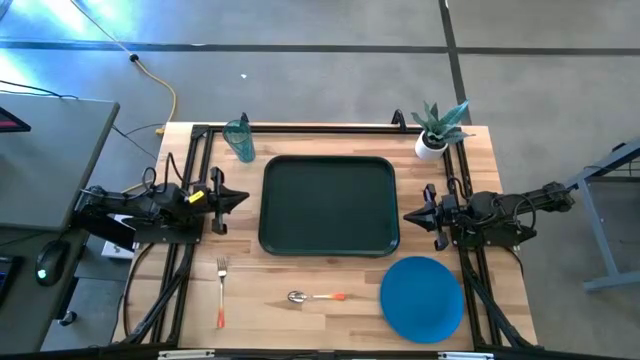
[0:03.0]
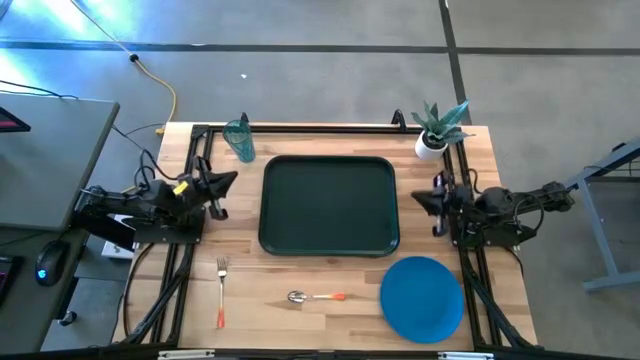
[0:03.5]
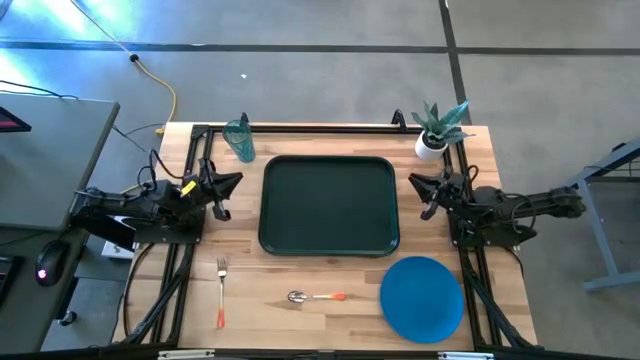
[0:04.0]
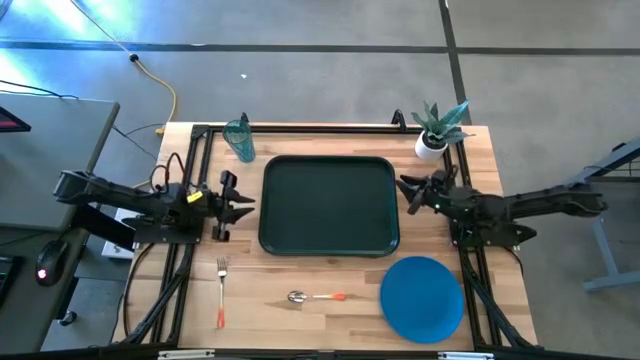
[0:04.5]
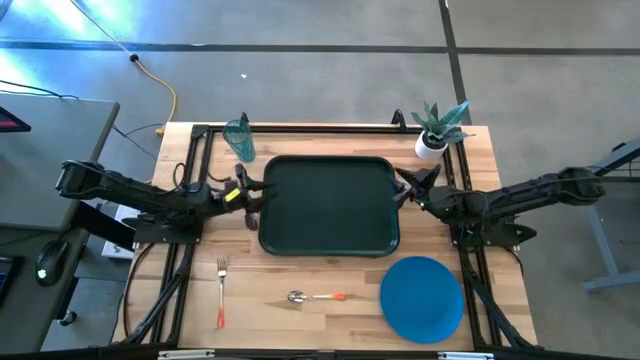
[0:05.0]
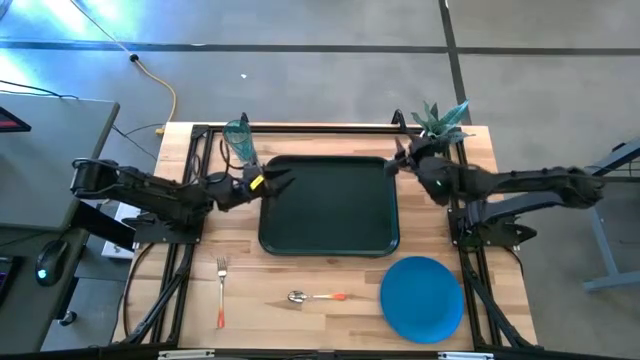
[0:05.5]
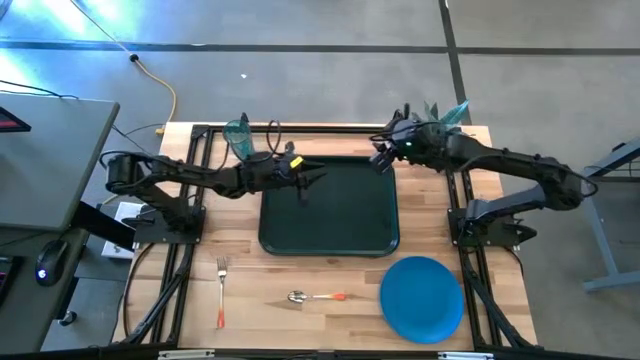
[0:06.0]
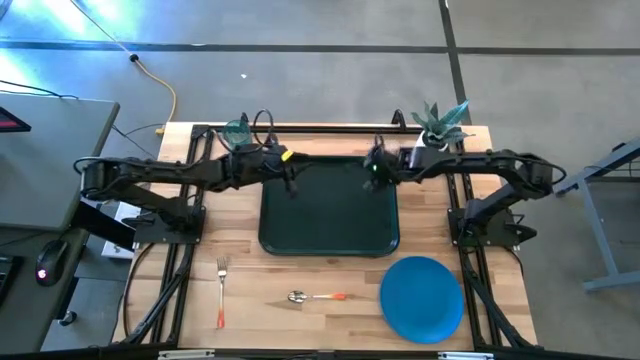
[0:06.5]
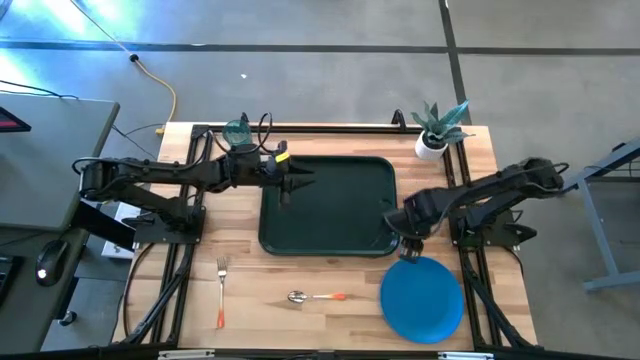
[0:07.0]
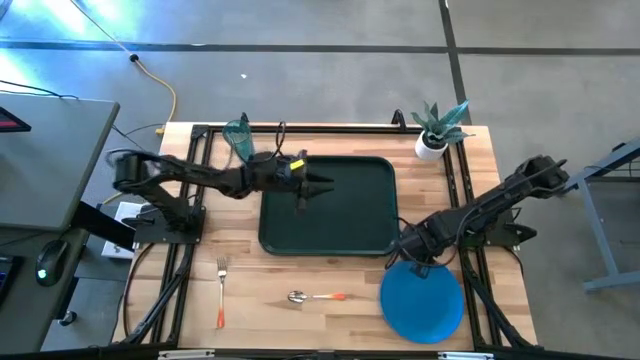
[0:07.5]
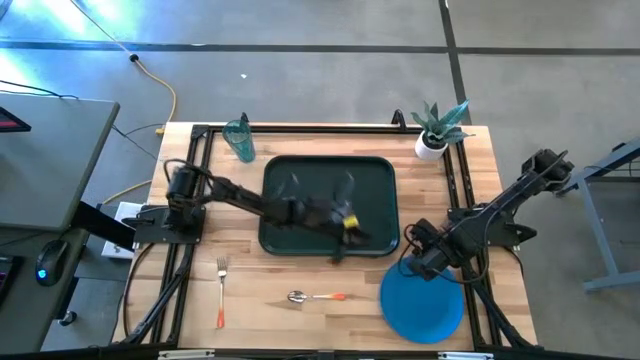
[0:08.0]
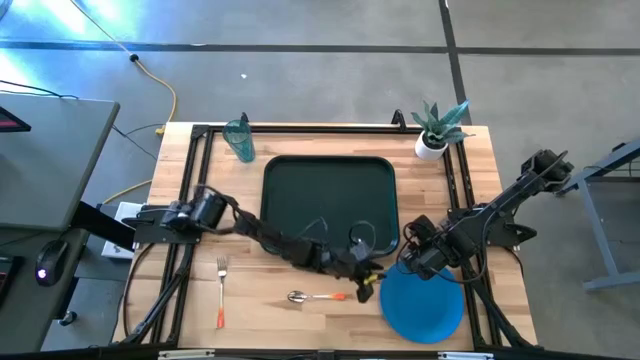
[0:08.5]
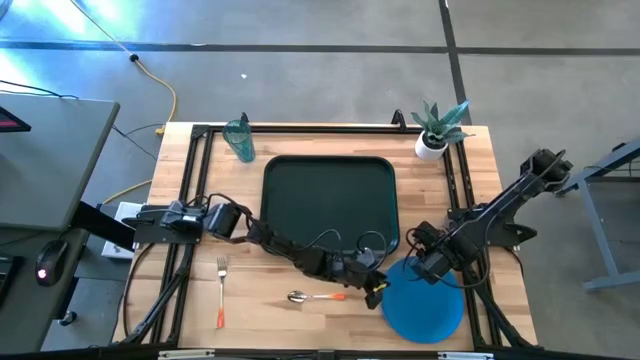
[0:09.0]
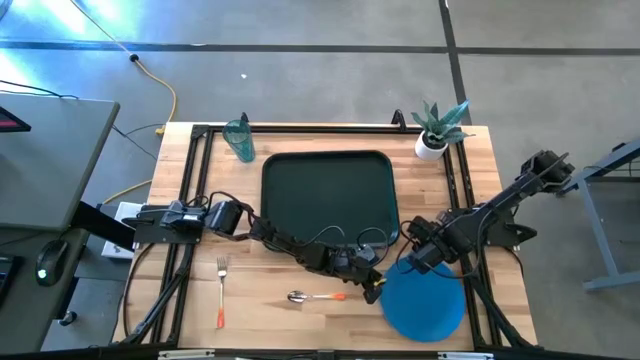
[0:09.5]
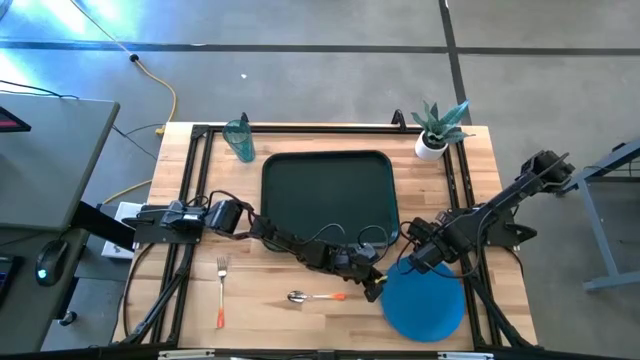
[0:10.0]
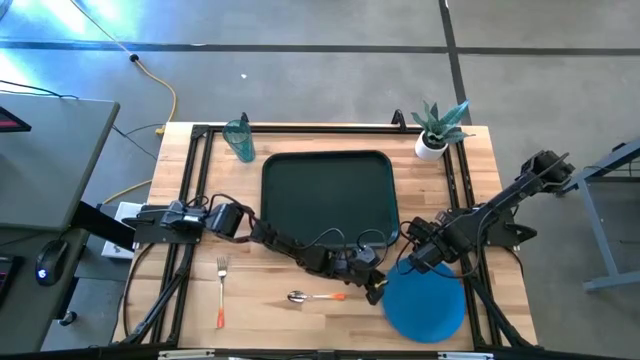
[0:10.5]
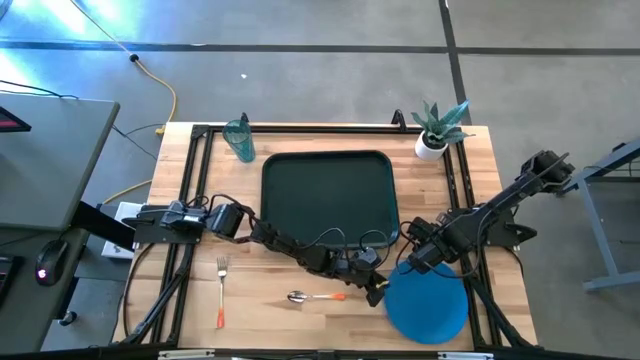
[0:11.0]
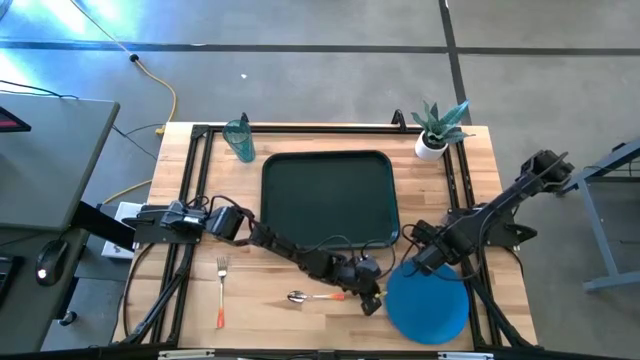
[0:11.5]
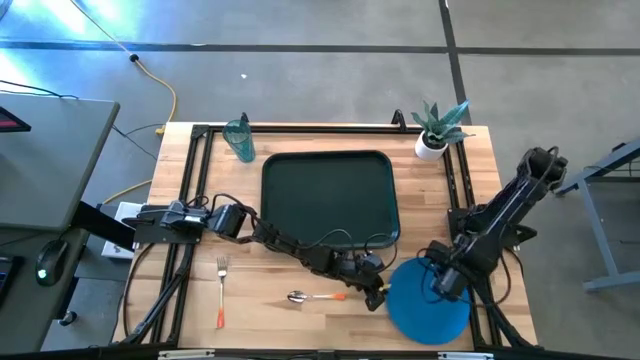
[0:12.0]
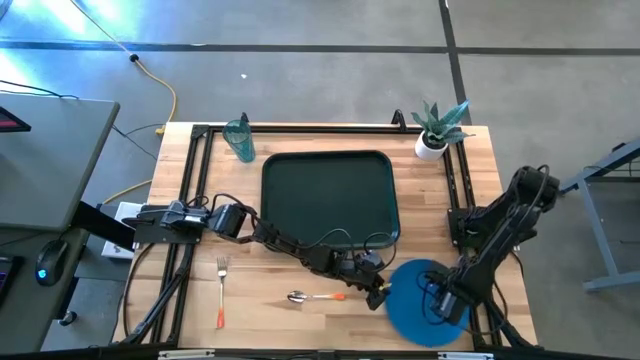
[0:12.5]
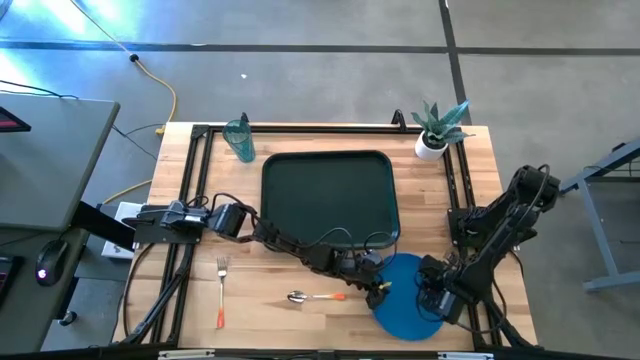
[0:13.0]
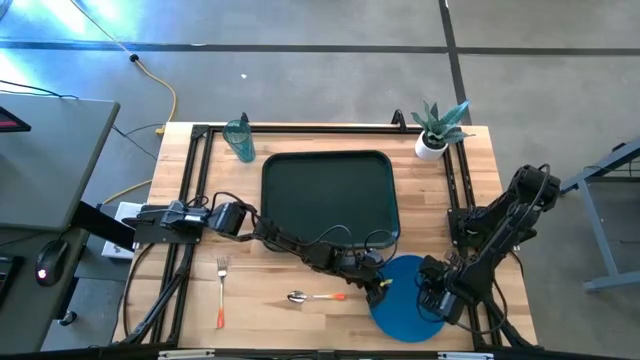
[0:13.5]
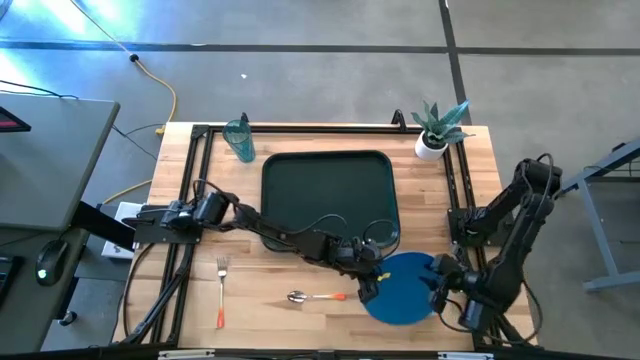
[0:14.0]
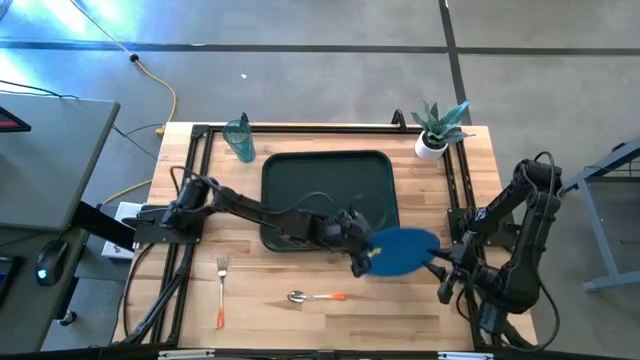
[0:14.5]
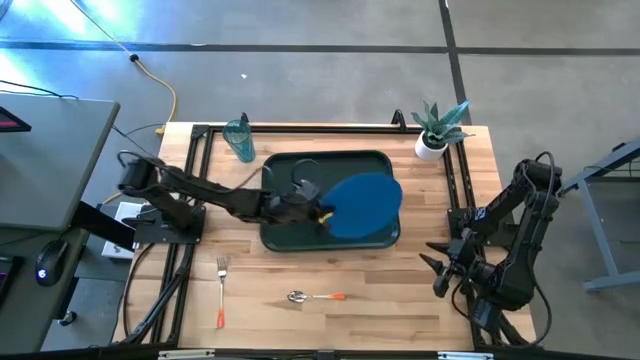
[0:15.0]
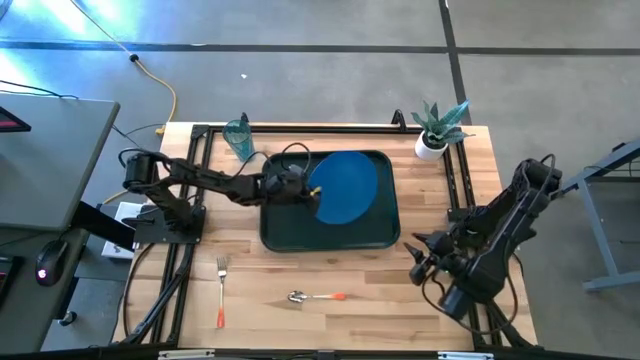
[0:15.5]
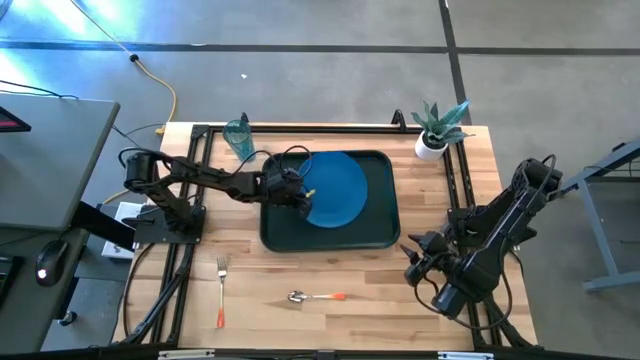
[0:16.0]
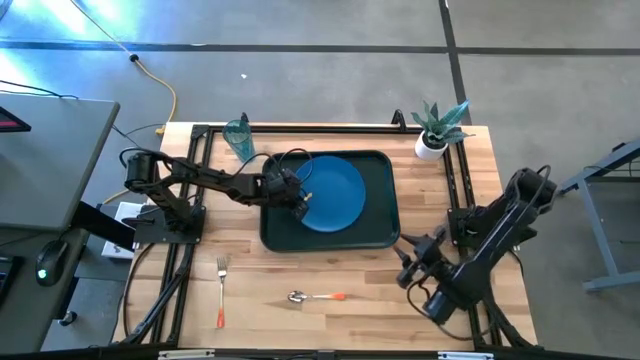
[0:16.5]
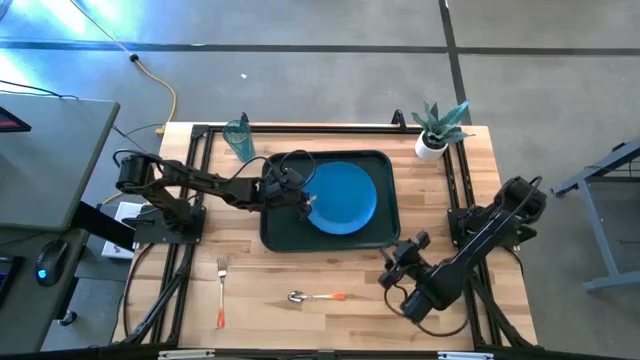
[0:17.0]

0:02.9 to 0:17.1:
Task: Pick and place plate/cup/fork/spoon on tray
Put the blue plate on the black tray

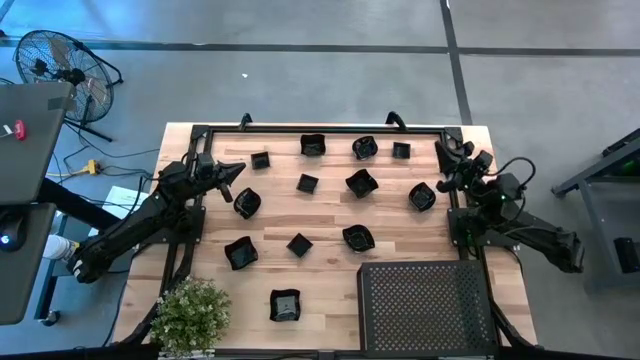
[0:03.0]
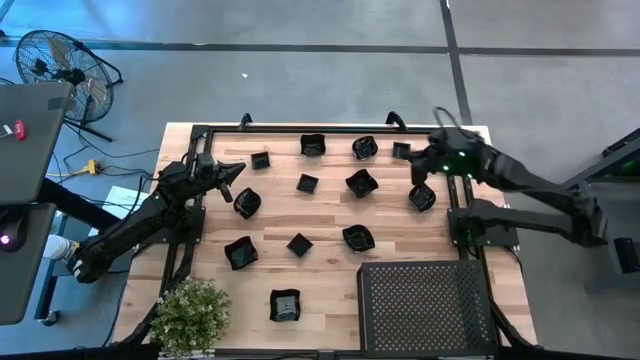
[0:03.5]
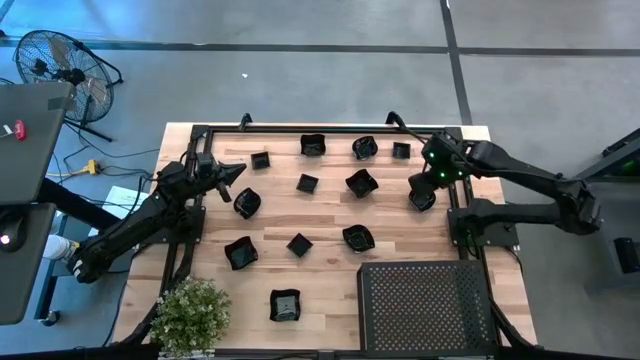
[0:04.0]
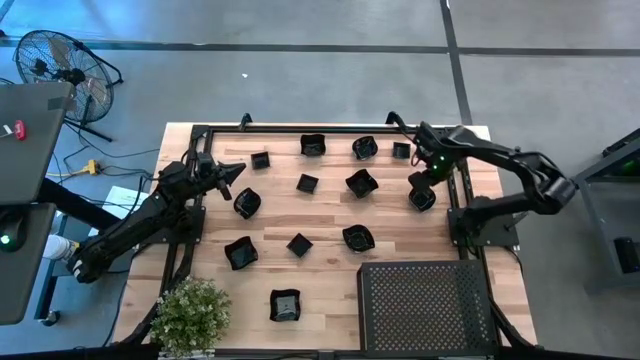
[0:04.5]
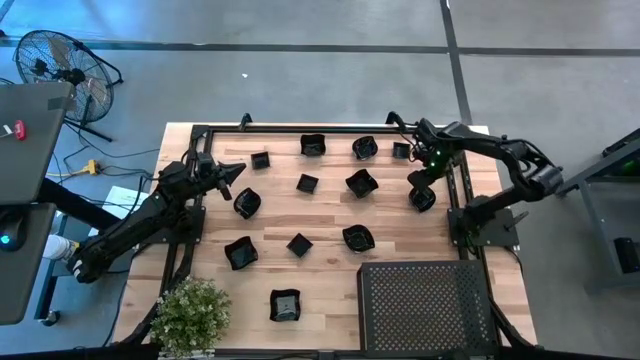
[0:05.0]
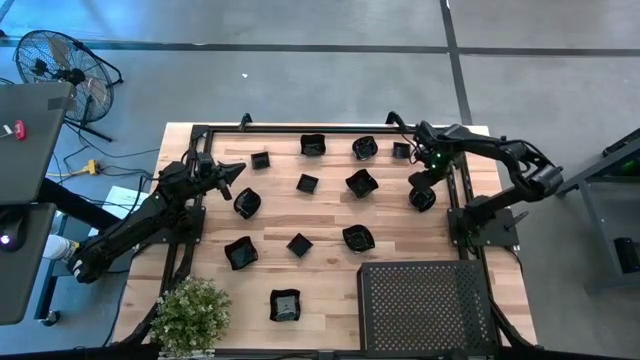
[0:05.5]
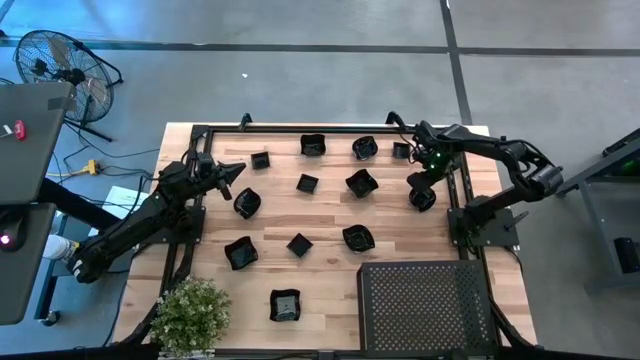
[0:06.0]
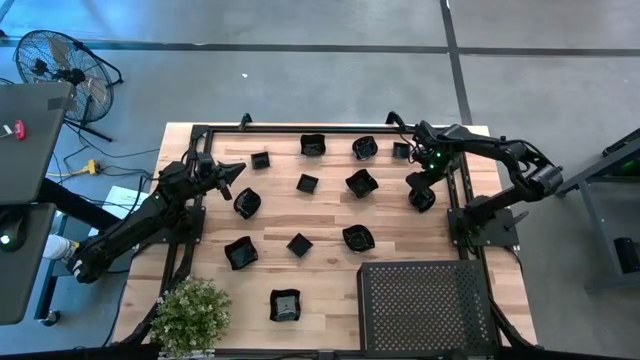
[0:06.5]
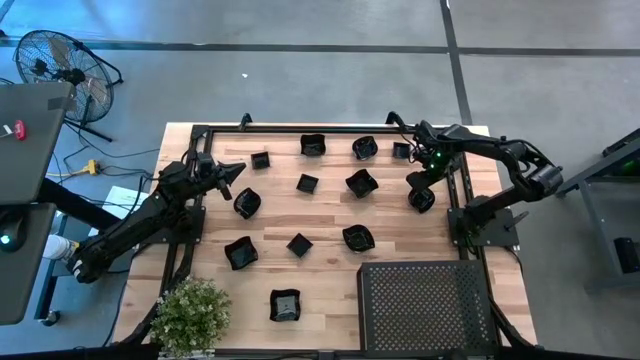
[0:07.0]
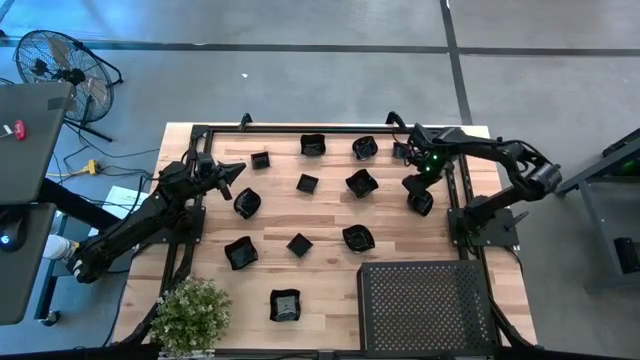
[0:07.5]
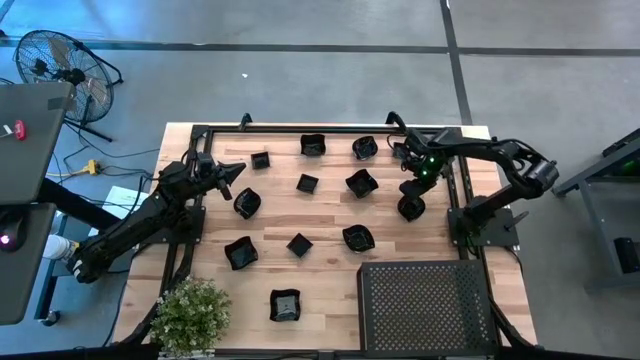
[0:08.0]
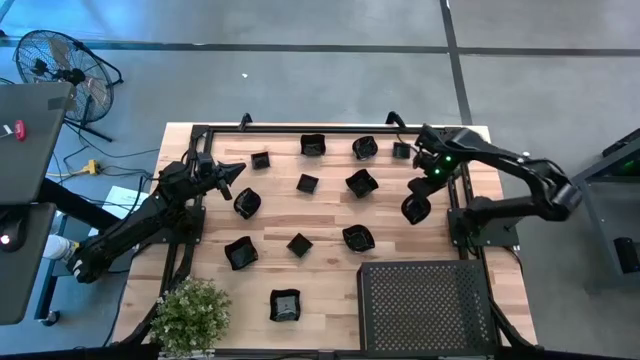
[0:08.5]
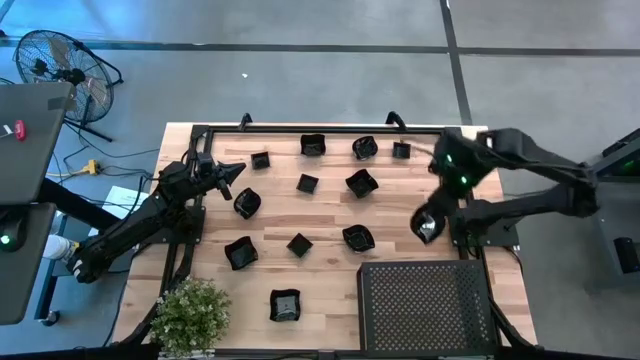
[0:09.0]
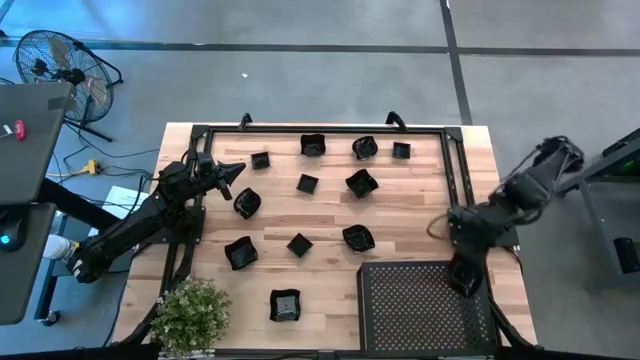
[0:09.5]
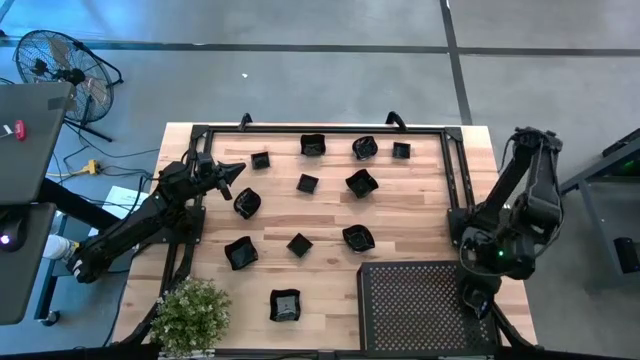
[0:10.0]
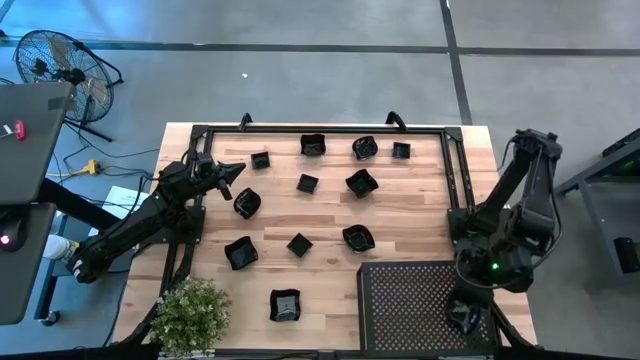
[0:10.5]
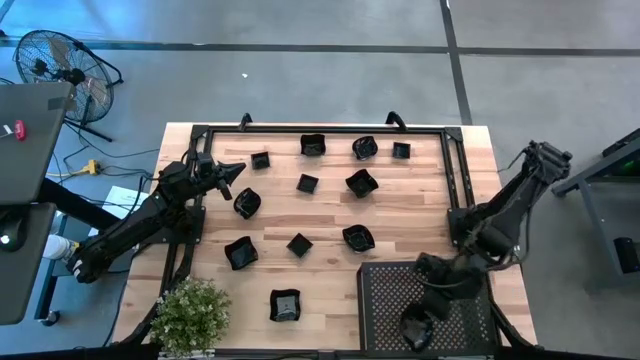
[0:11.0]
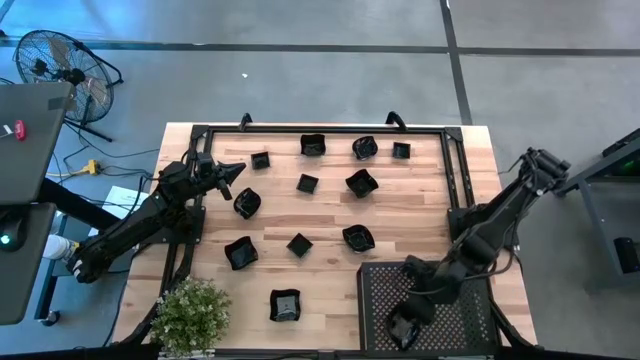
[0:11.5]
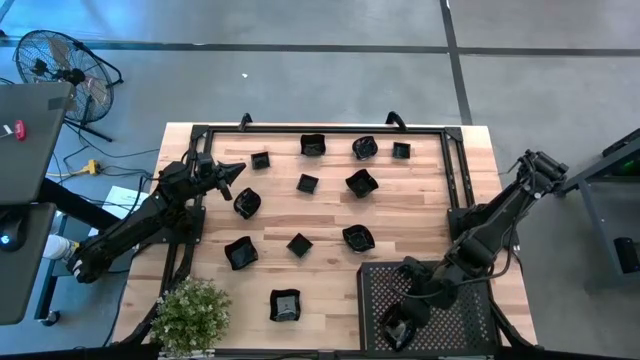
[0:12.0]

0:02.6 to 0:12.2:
Task: Pick & Place Mini shaped plates
Put the black leaf-shaped plate on the shelf
